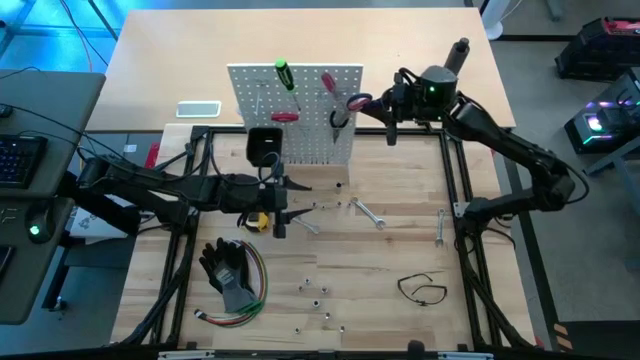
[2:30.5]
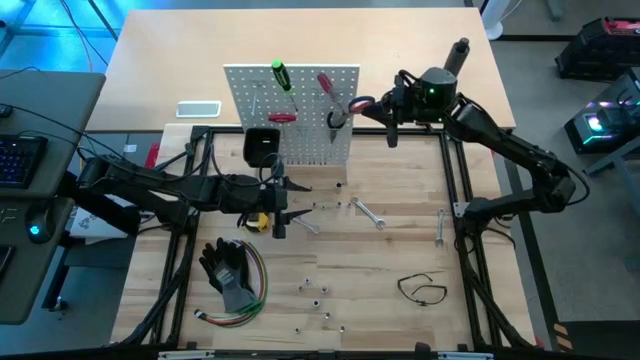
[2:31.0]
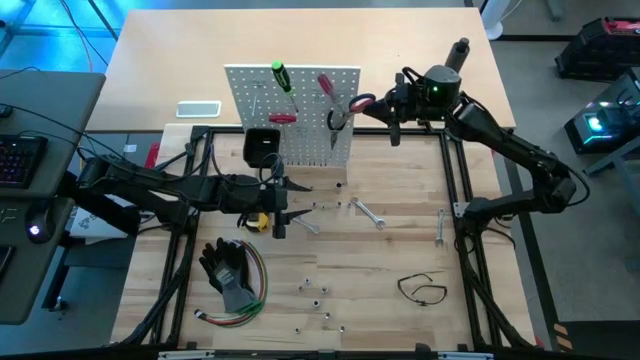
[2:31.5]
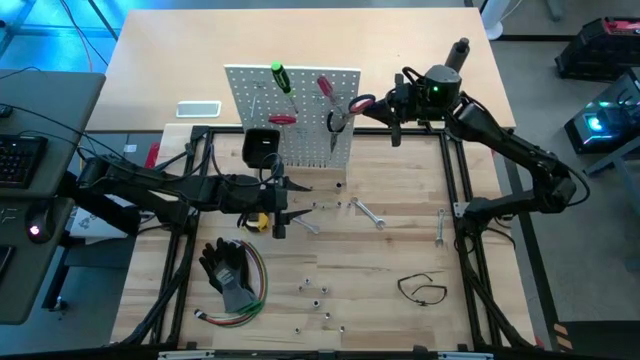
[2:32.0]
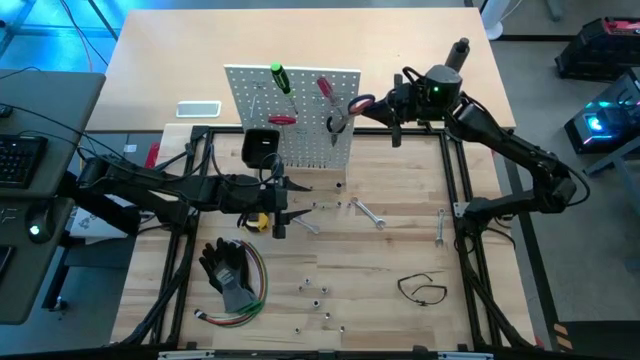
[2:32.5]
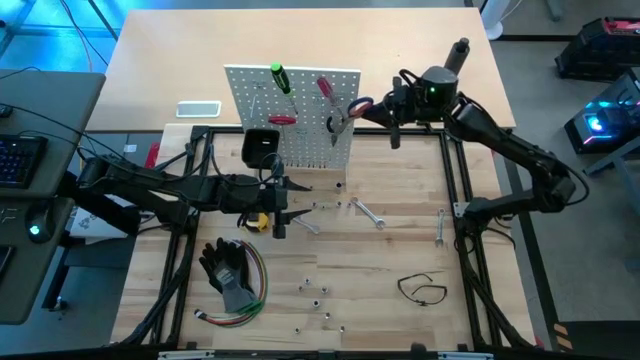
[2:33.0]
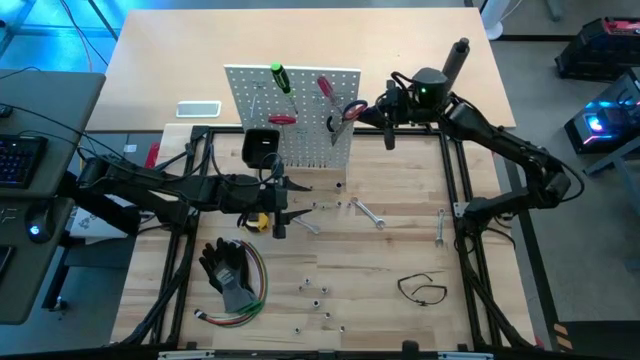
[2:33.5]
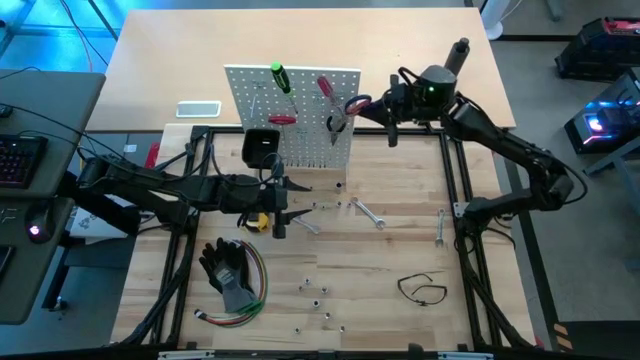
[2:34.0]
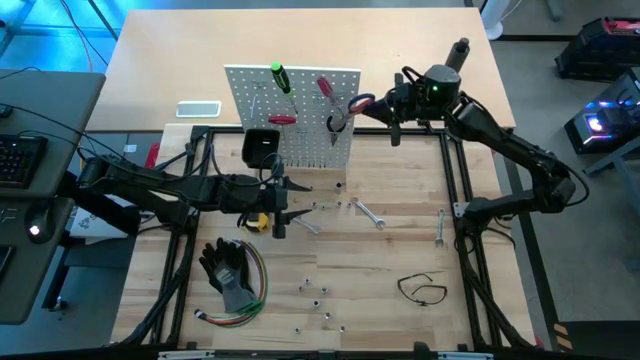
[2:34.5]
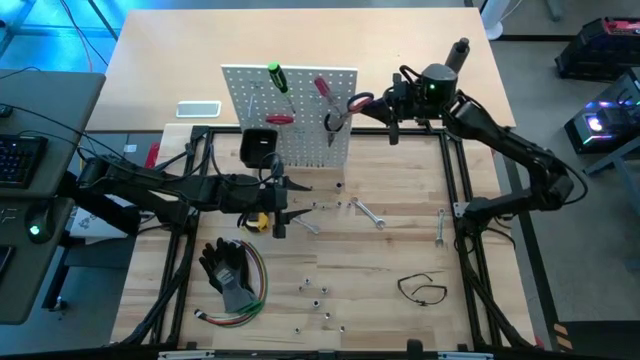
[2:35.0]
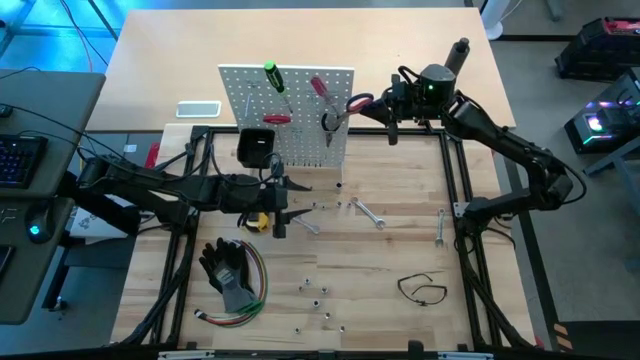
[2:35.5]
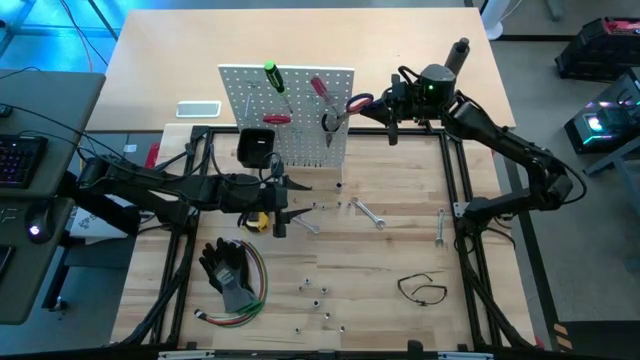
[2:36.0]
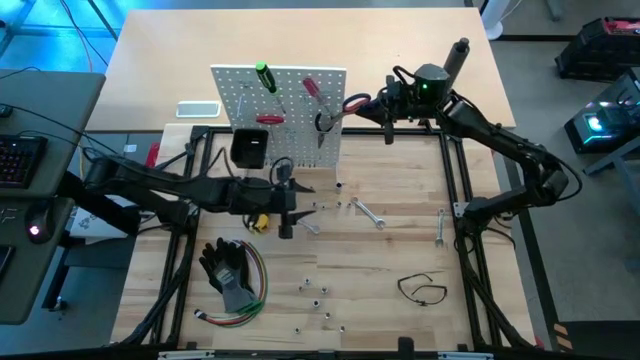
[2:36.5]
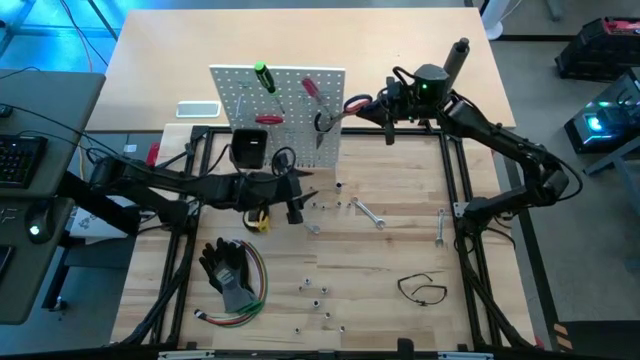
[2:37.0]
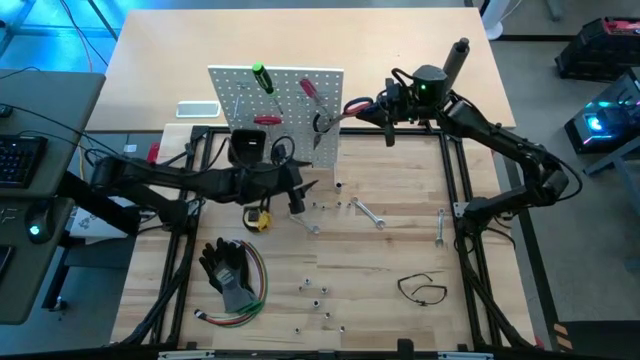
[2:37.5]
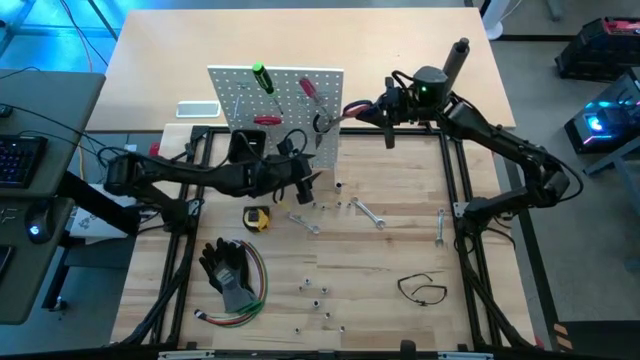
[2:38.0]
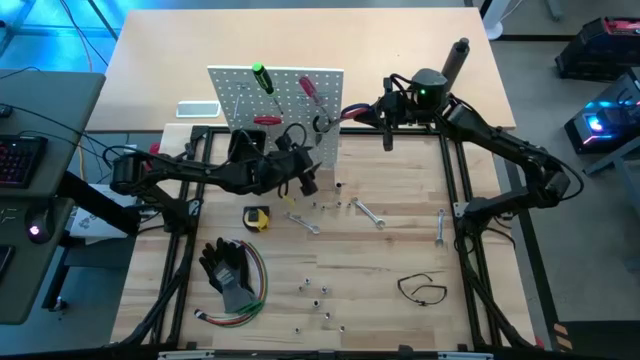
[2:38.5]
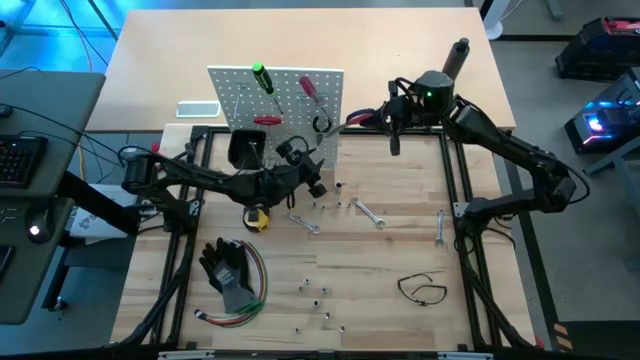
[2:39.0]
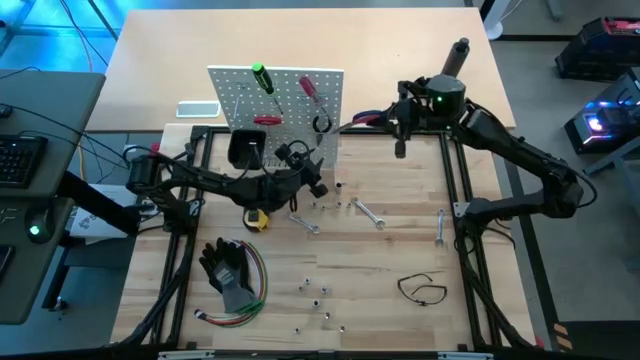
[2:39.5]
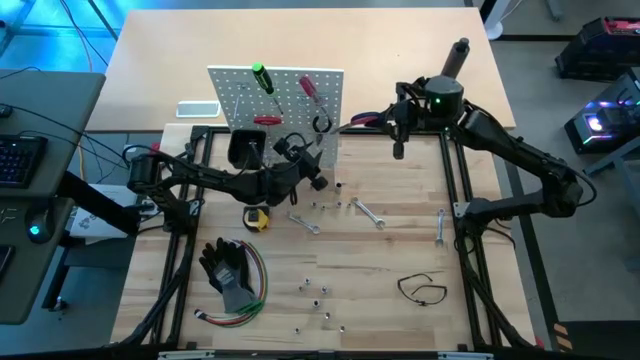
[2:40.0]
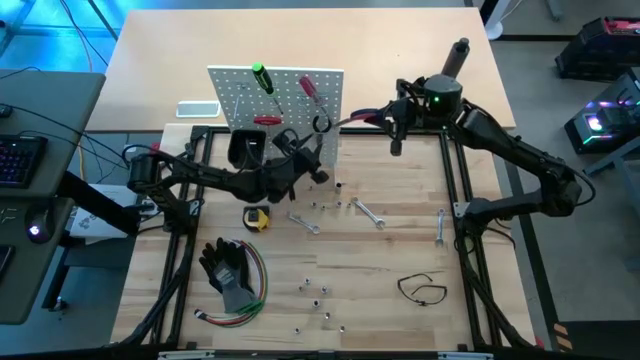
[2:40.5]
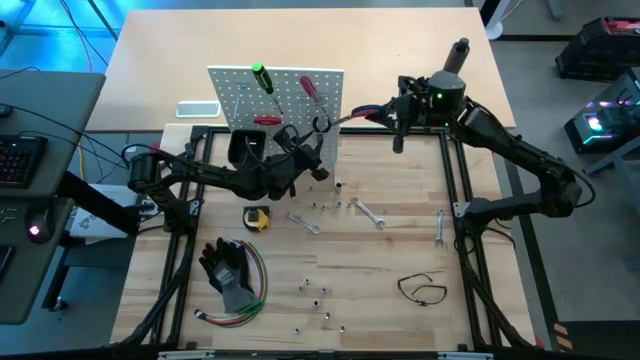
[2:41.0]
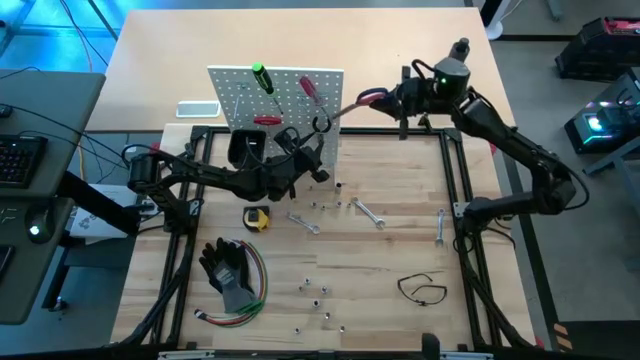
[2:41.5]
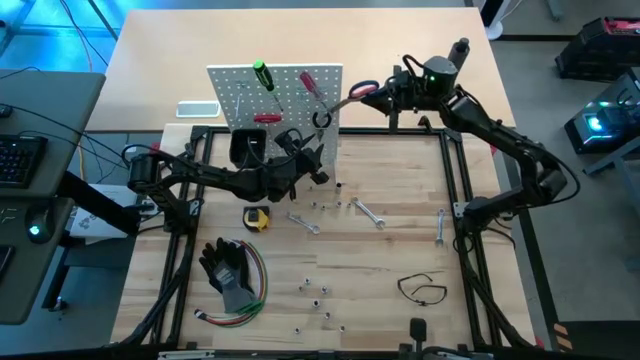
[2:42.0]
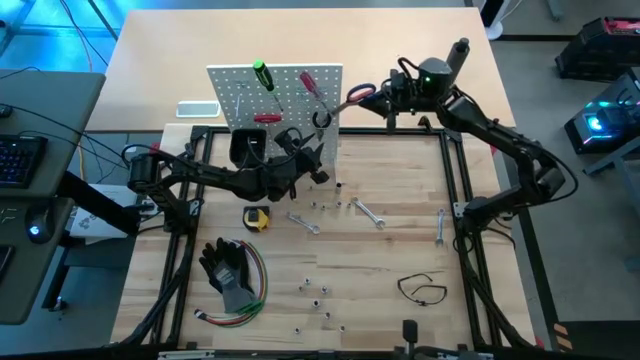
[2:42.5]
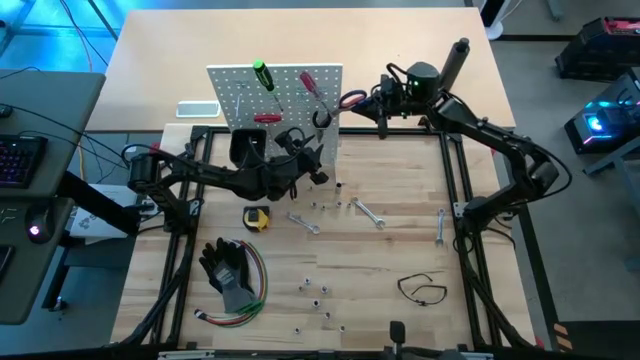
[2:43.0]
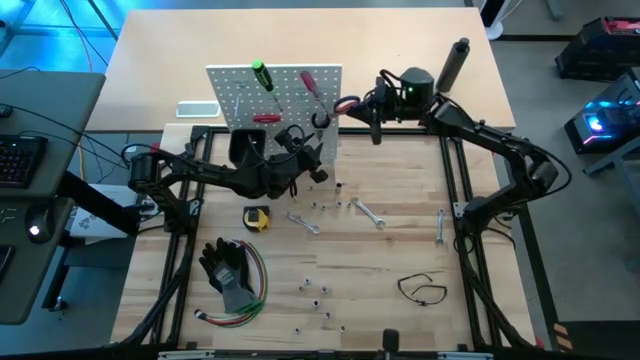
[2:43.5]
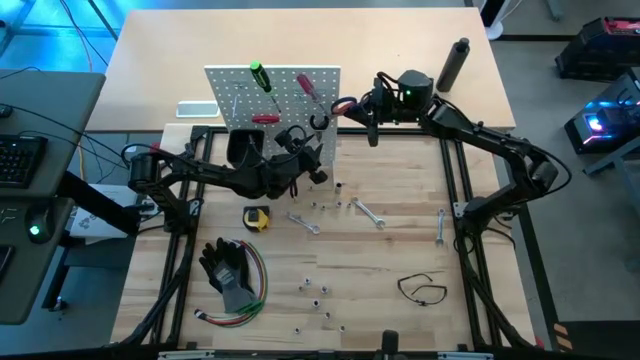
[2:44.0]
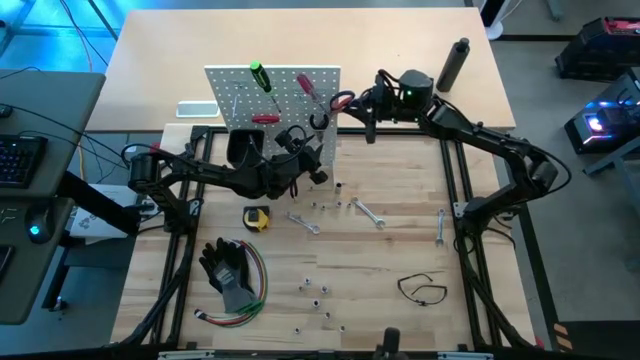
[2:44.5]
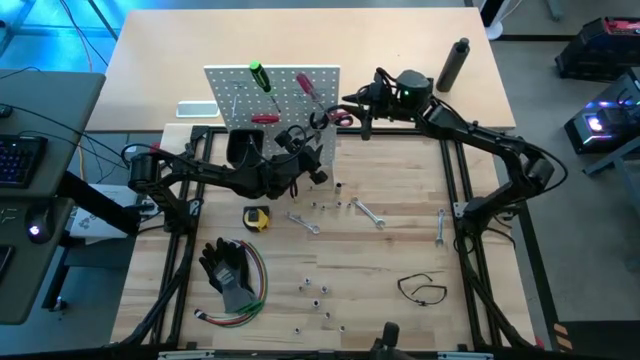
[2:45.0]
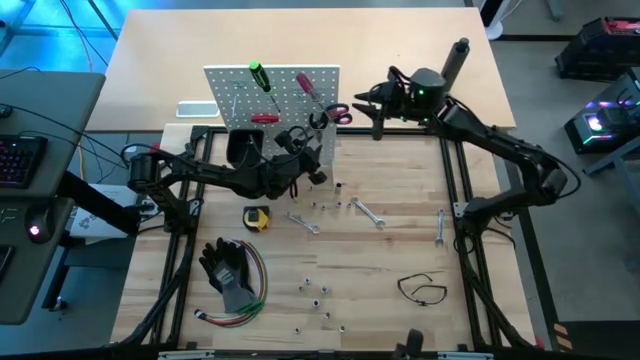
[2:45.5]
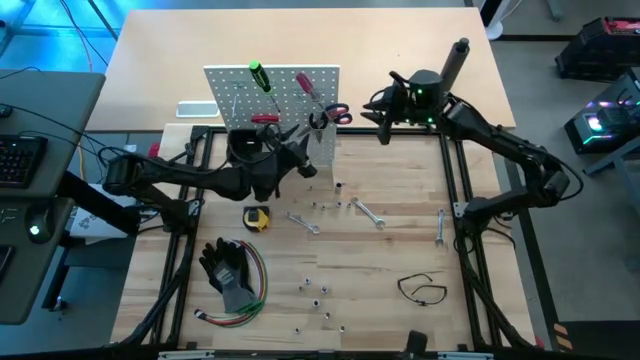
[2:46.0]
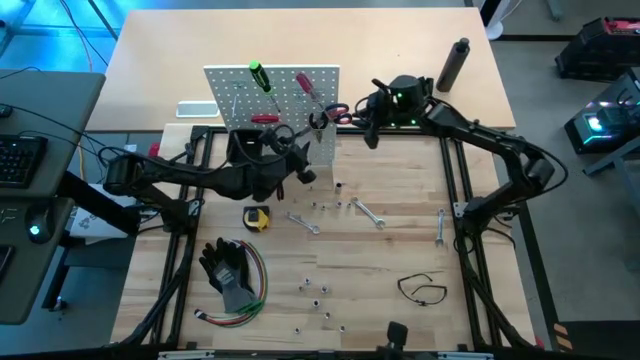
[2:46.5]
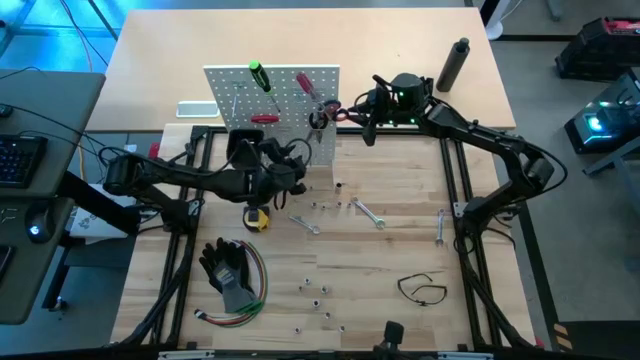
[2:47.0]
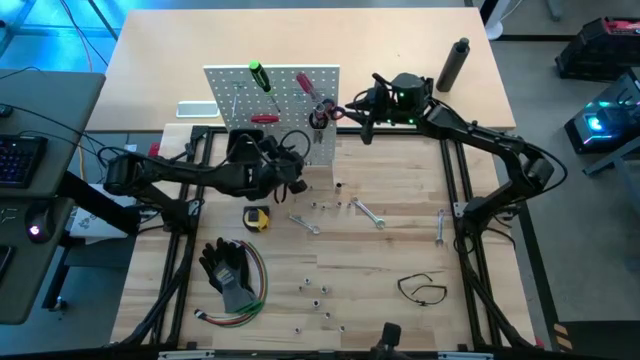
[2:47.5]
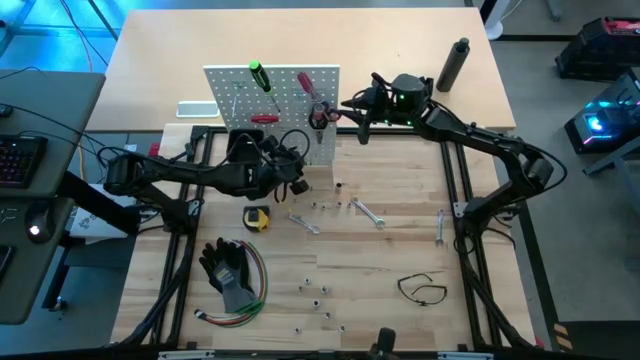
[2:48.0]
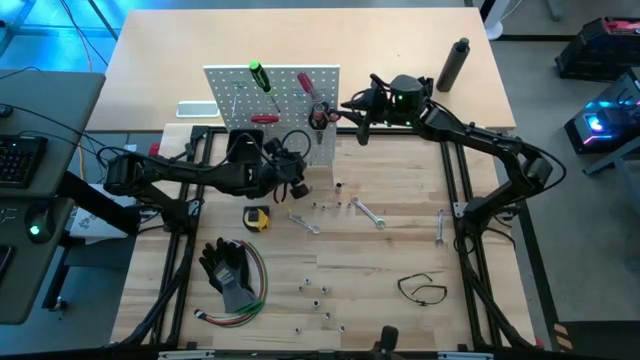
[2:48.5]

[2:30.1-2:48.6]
Task: Hang tools onto peg board
Hang the blue scissors on the white peg board
